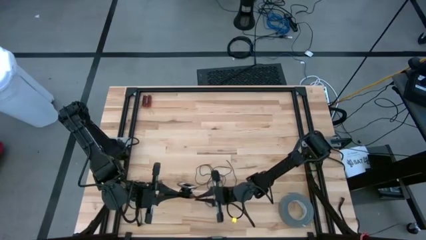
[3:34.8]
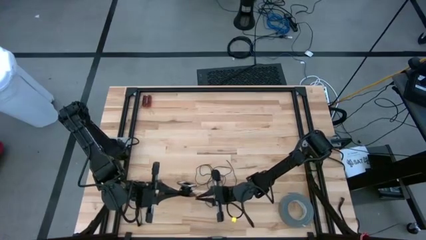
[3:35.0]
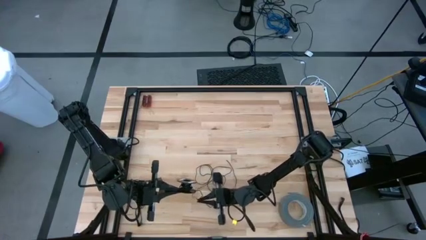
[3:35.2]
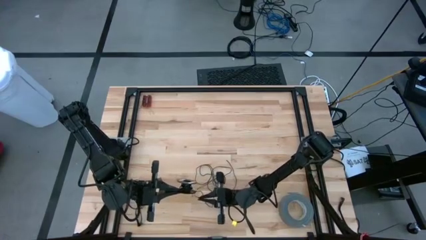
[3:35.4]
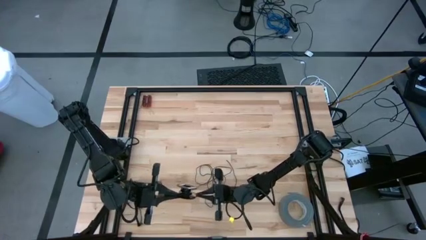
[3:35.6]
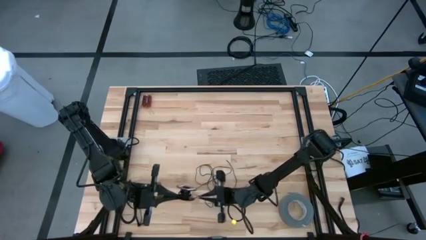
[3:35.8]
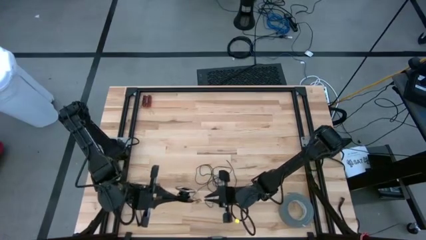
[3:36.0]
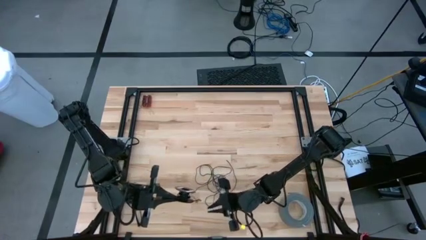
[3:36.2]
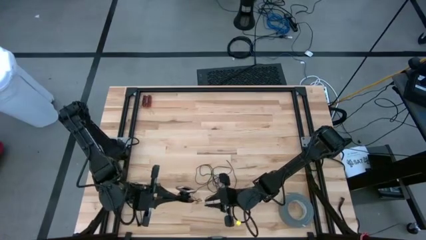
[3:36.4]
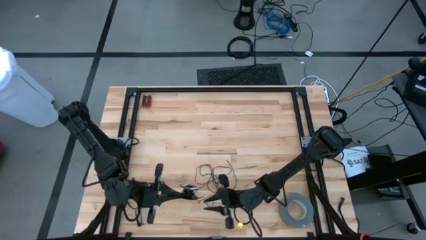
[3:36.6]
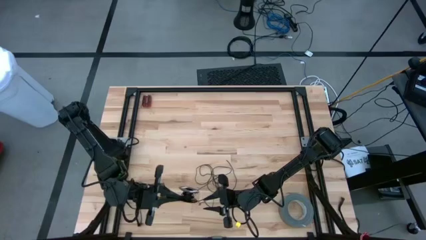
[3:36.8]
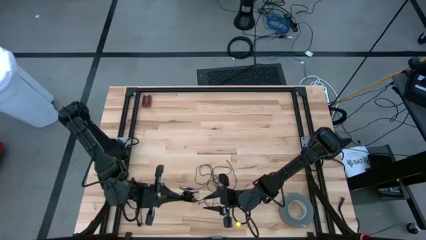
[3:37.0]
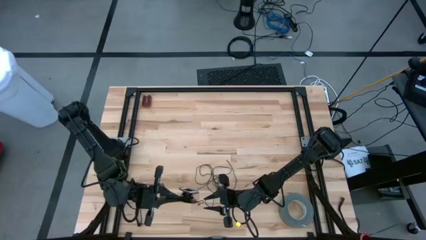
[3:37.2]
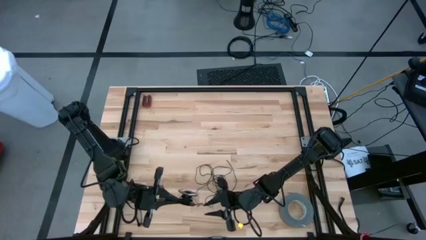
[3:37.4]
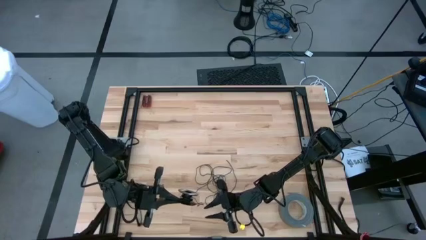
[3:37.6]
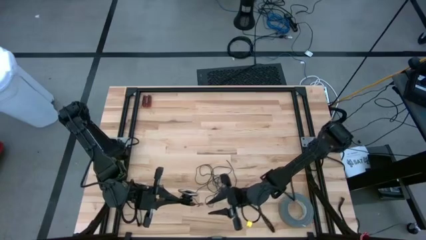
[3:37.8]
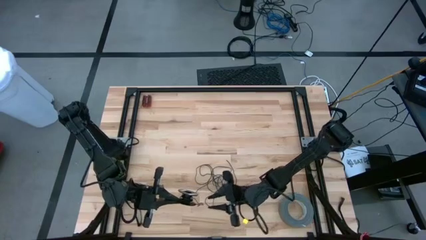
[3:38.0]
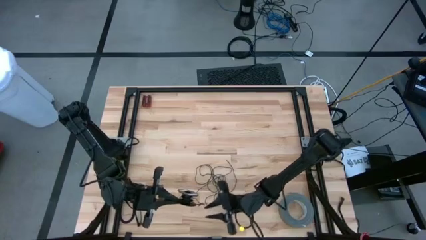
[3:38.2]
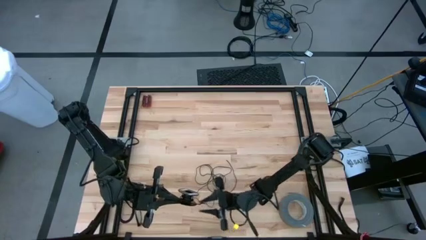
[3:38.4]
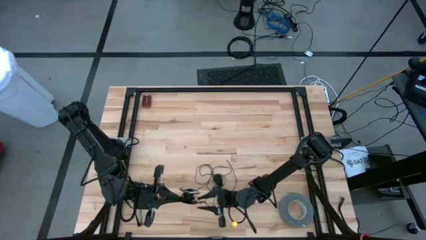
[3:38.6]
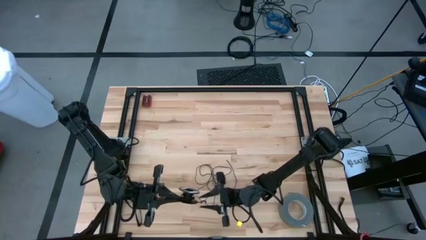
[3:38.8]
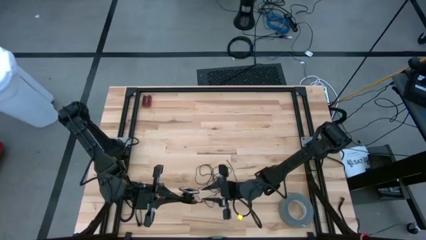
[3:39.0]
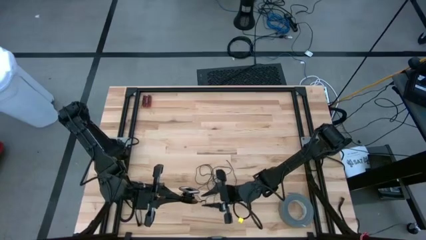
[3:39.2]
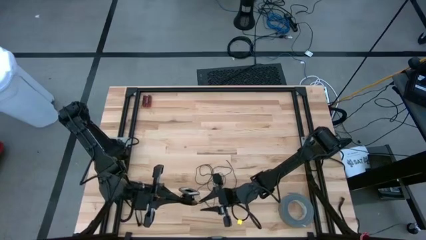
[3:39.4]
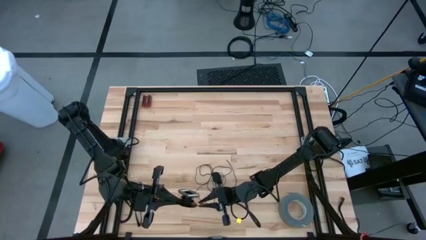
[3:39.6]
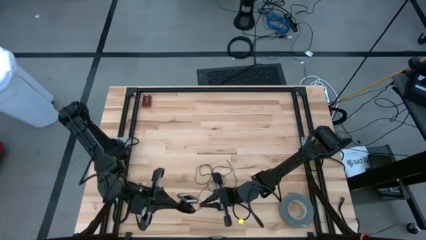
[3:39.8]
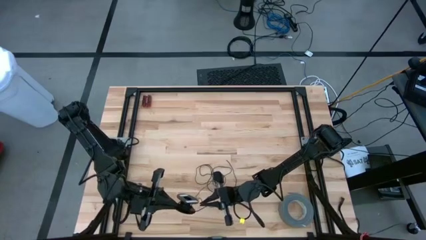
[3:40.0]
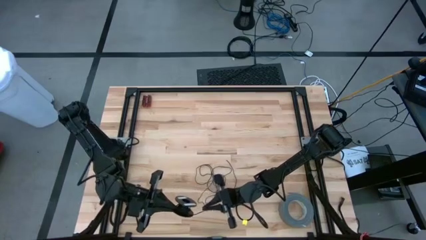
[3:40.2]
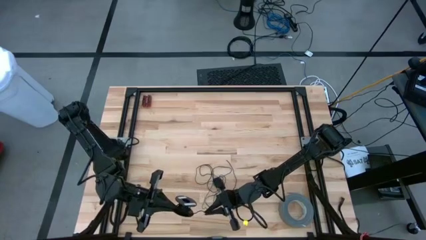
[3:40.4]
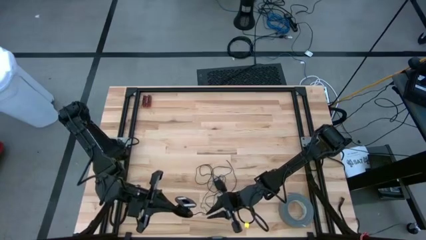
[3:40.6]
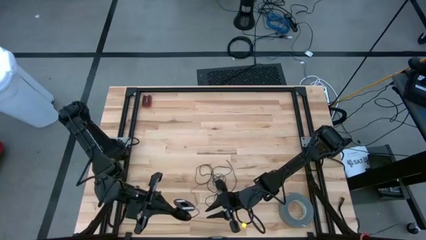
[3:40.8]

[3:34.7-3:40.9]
Task: Coil cords
Coil the black wire on the spool

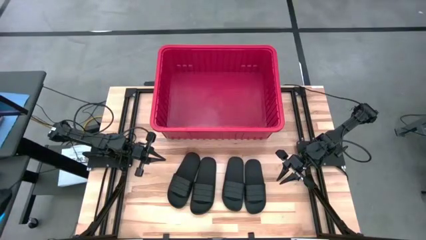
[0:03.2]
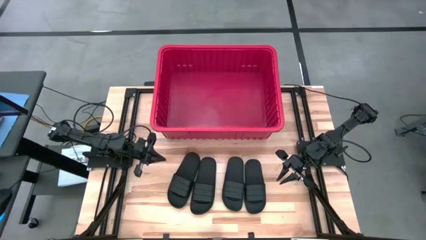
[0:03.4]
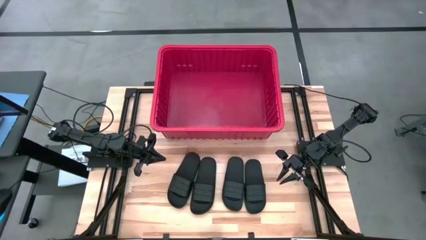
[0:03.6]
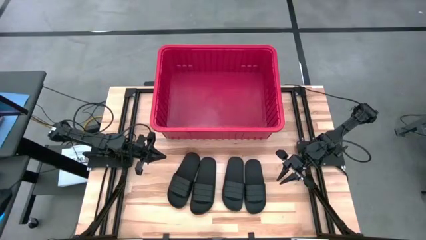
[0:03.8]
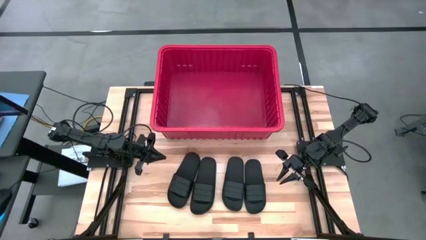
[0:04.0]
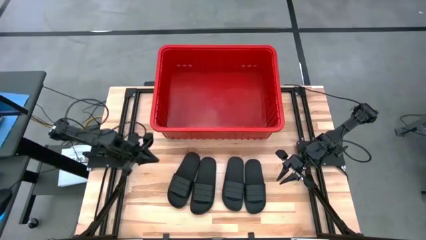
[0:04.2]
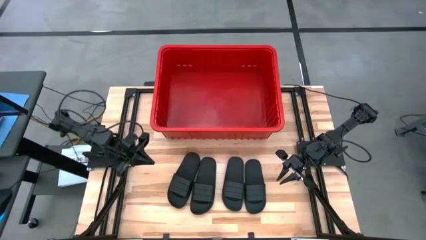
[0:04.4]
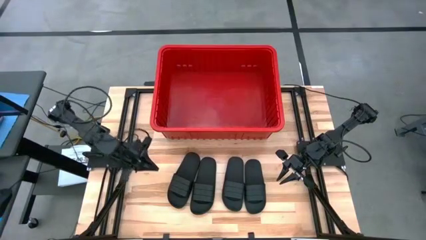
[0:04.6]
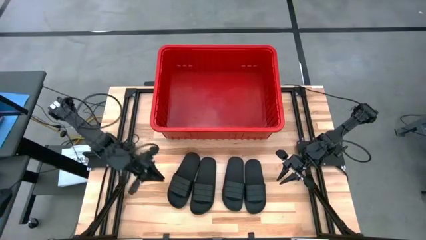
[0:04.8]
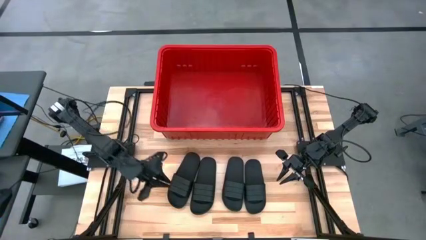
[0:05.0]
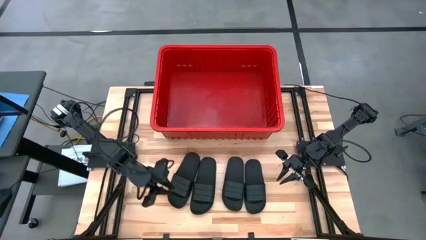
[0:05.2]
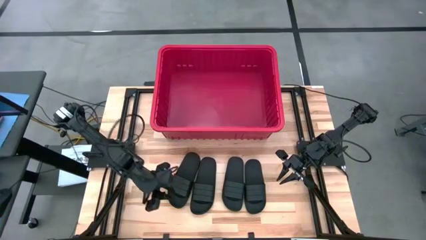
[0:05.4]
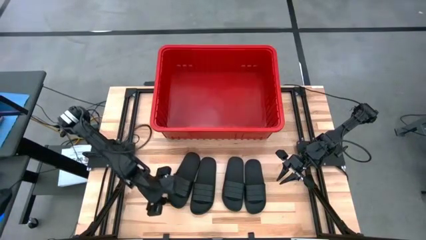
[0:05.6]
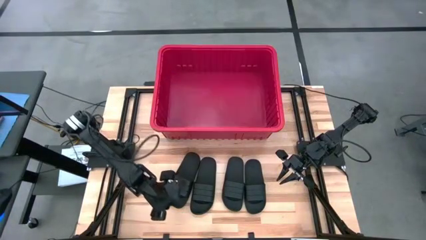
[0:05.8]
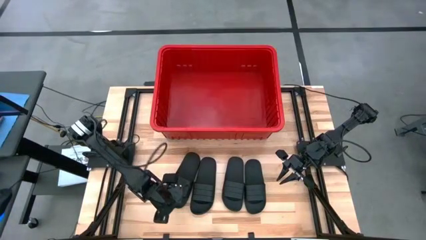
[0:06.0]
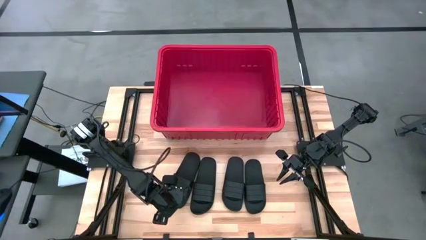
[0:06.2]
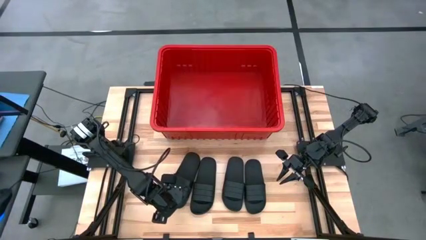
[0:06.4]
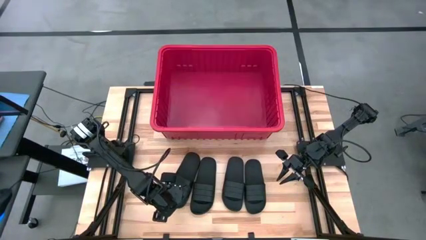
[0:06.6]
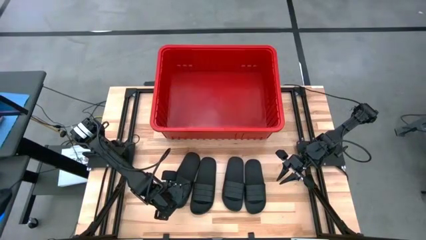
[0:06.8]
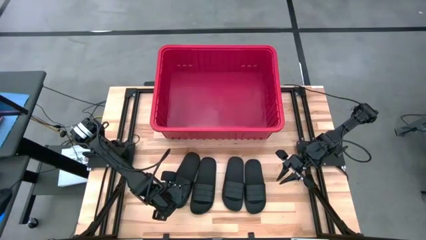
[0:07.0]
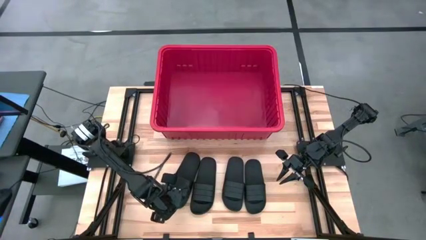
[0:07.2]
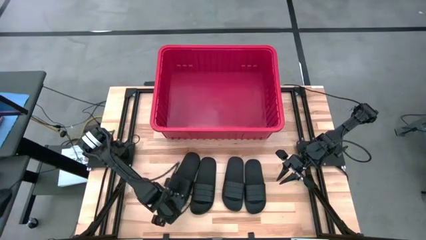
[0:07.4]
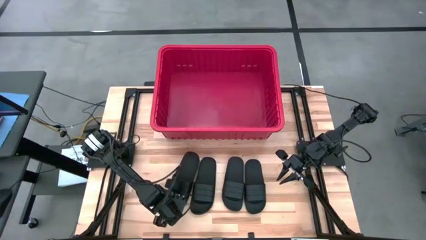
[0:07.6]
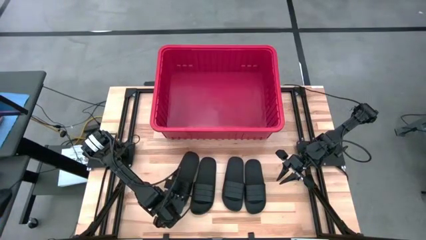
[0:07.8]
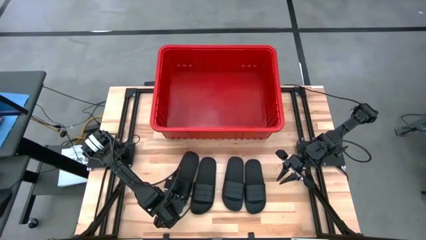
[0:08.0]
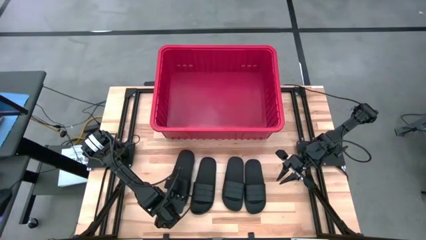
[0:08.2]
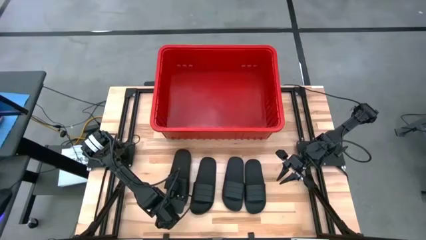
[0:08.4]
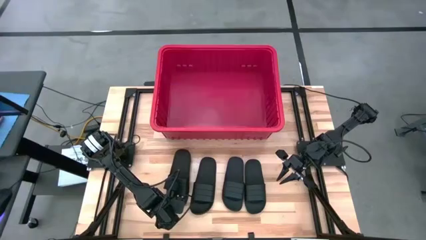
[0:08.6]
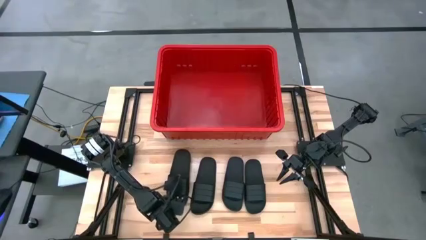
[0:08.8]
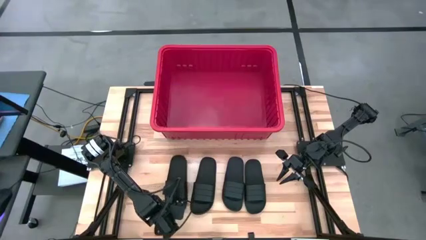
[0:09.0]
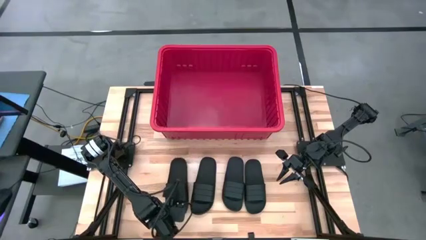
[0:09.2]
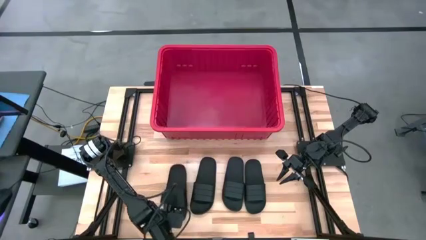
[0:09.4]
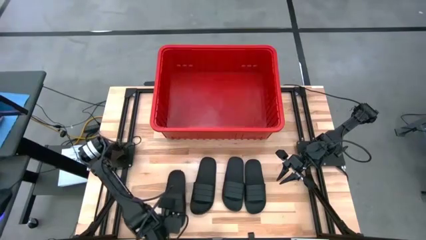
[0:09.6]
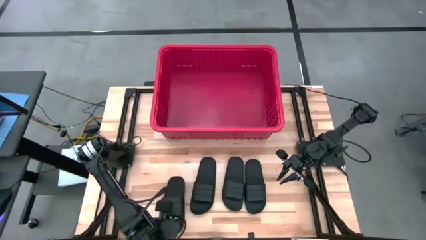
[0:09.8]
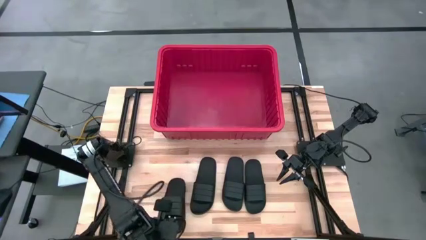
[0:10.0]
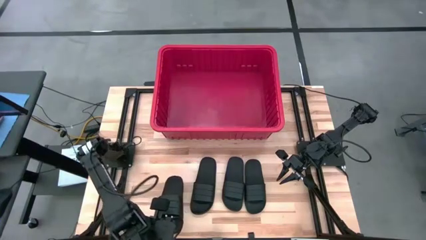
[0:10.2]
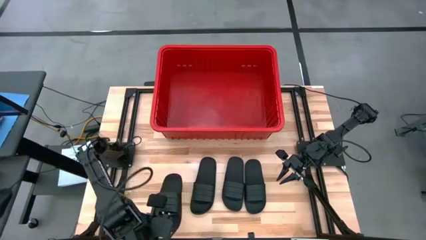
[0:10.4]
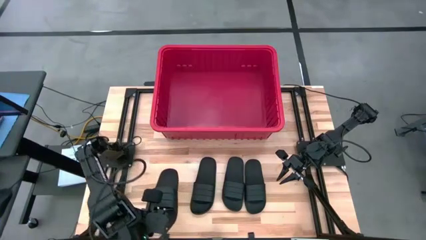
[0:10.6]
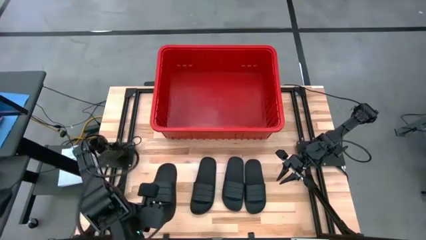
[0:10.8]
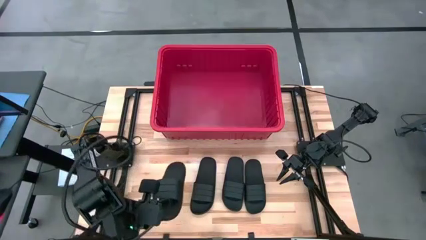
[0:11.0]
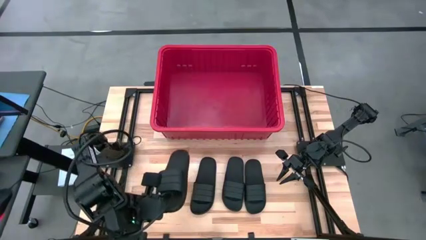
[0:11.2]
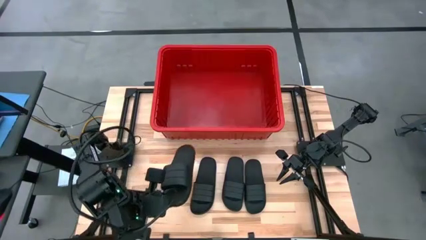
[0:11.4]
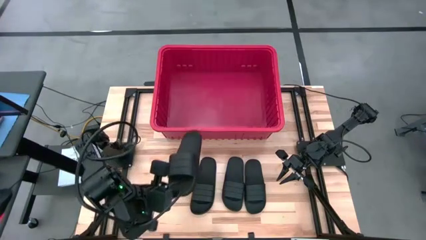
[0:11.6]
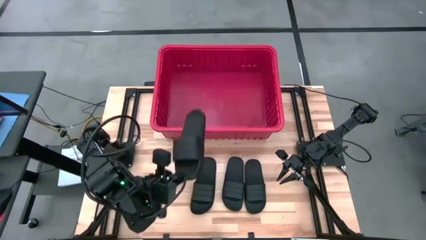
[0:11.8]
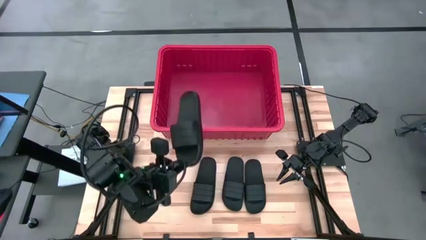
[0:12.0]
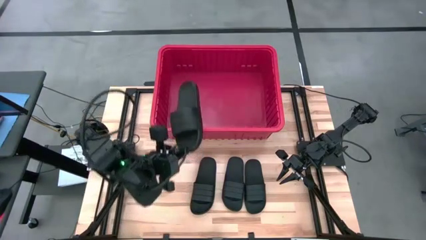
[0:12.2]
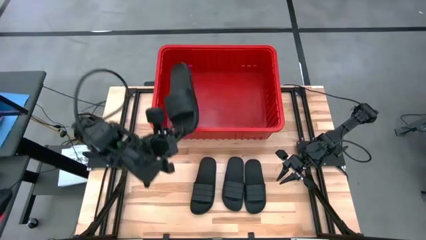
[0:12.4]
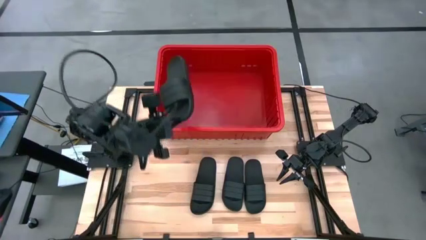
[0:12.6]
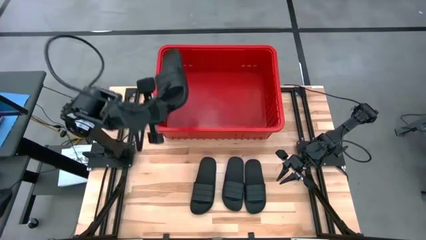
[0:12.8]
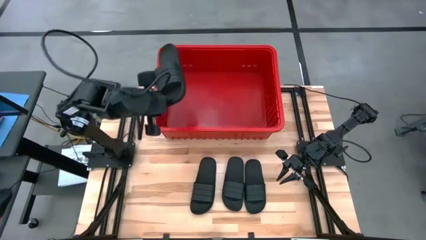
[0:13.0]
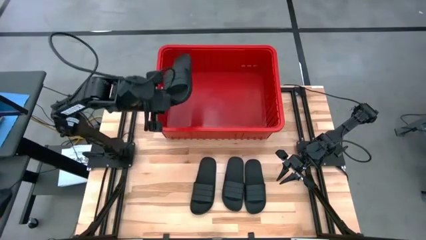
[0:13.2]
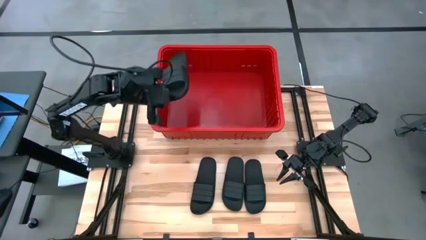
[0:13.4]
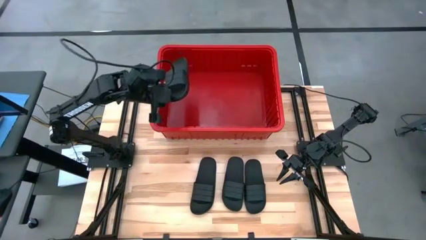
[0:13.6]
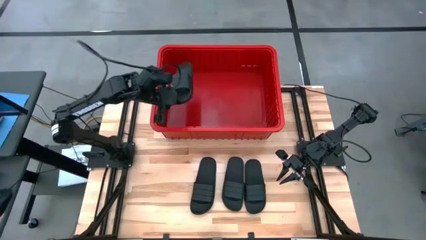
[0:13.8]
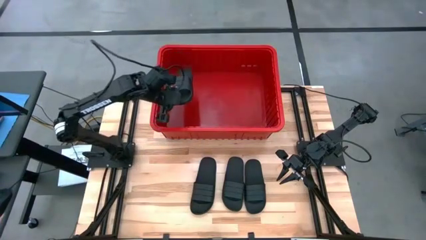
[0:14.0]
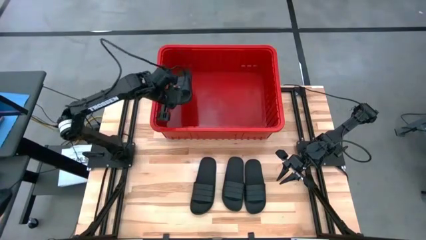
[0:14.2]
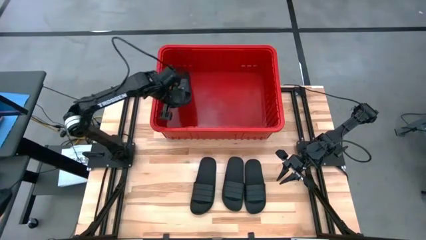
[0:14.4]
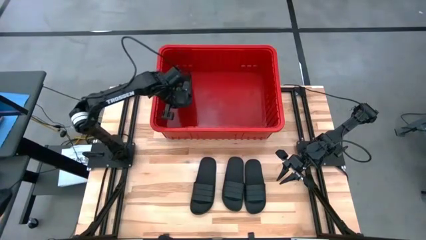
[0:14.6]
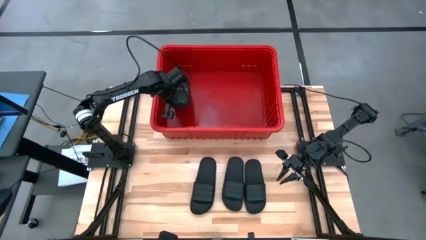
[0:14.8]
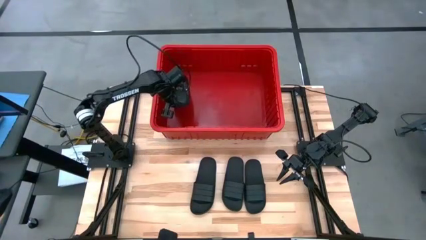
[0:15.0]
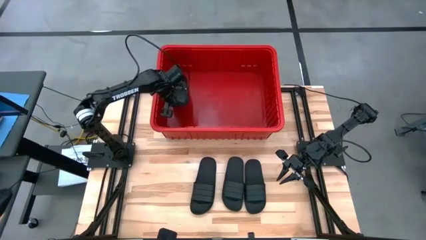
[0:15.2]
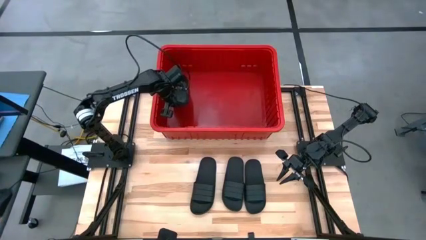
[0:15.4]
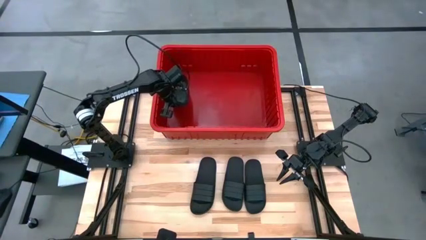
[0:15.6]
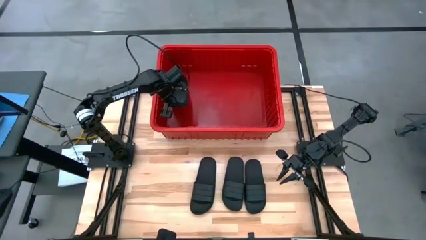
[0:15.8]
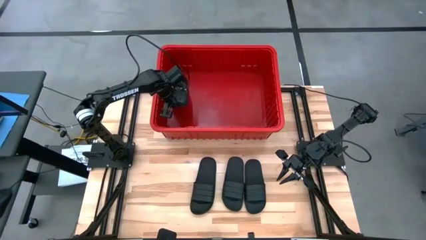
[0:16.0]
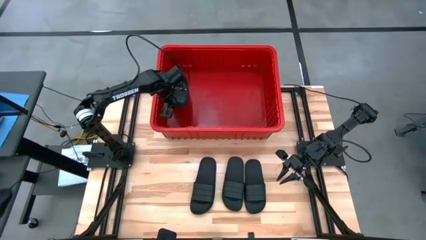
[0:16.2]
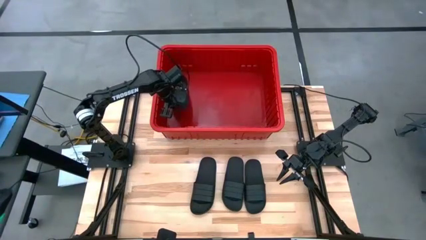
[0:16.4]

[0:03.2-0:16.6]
Task: Pick and place slides into bin
Put the left black slide into the red bin
